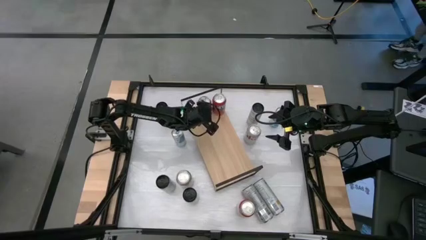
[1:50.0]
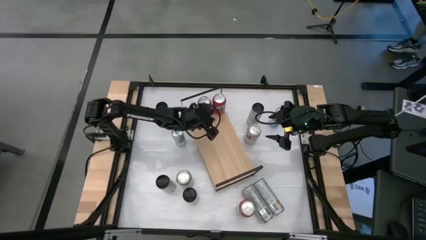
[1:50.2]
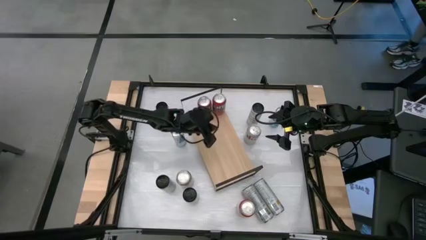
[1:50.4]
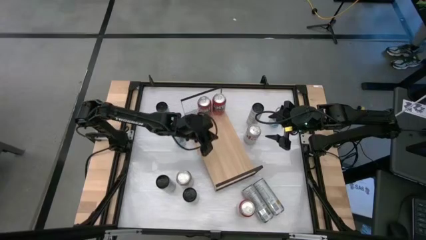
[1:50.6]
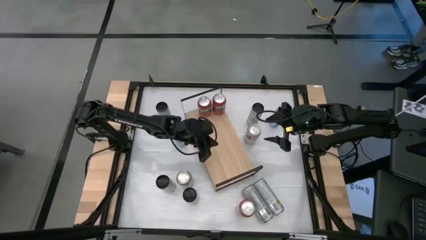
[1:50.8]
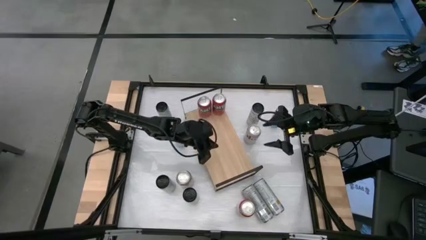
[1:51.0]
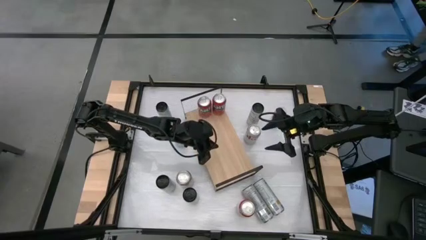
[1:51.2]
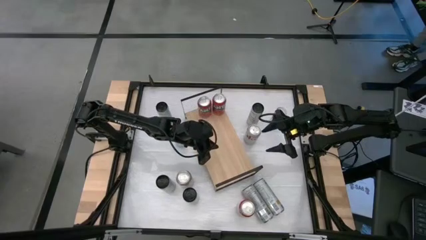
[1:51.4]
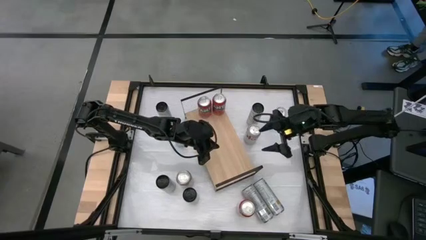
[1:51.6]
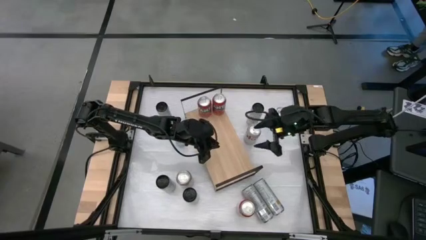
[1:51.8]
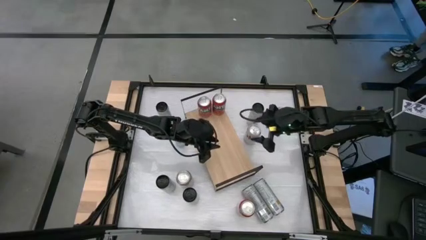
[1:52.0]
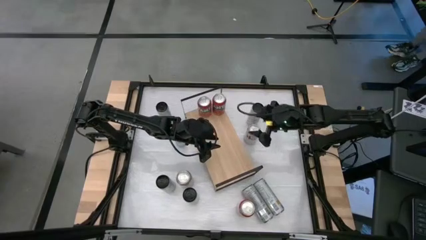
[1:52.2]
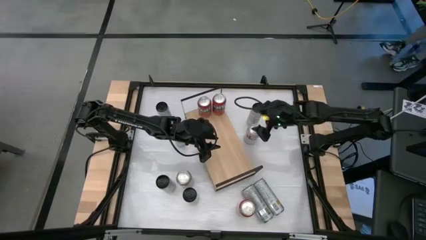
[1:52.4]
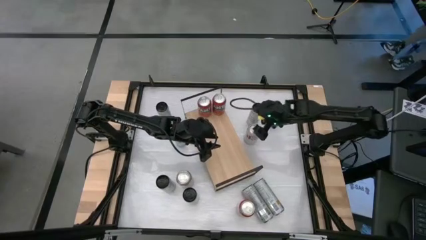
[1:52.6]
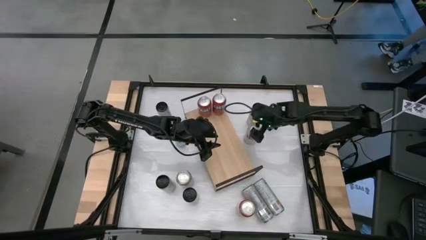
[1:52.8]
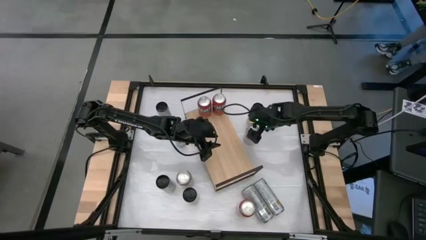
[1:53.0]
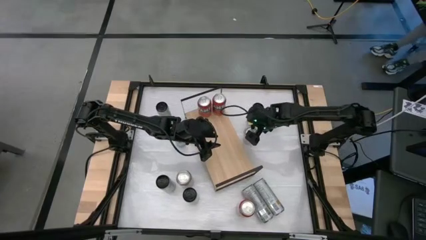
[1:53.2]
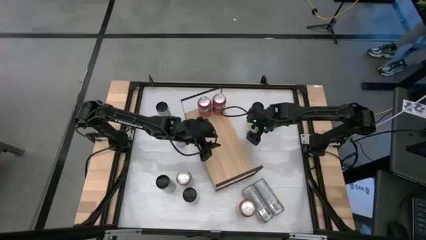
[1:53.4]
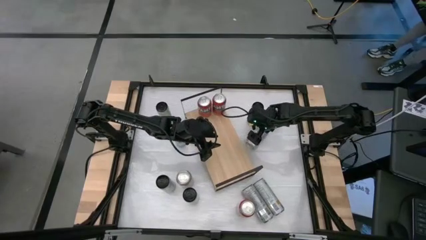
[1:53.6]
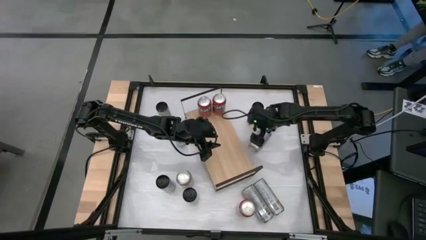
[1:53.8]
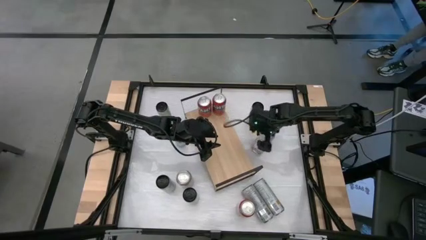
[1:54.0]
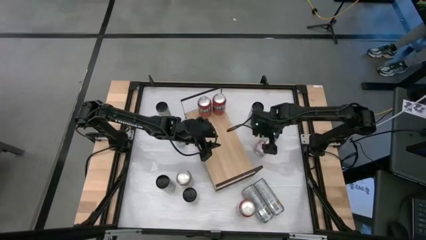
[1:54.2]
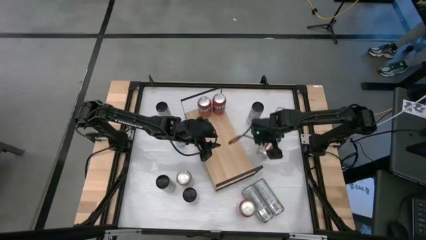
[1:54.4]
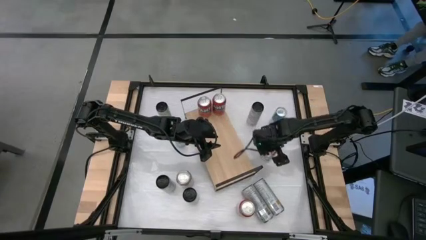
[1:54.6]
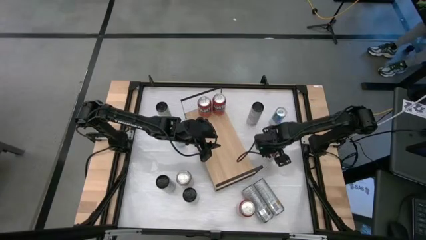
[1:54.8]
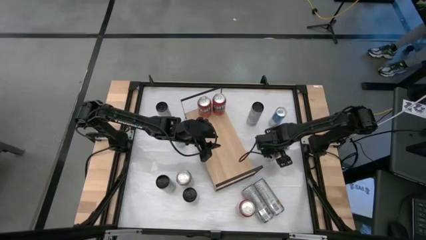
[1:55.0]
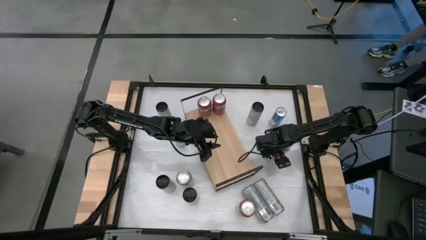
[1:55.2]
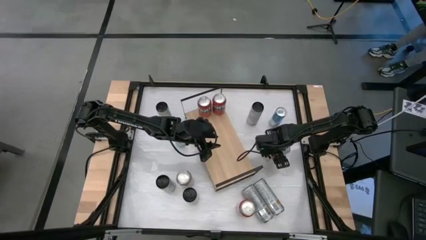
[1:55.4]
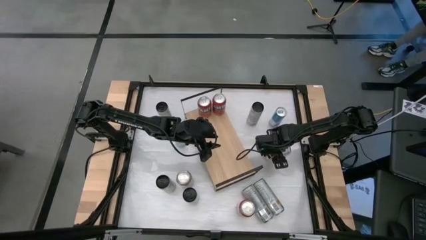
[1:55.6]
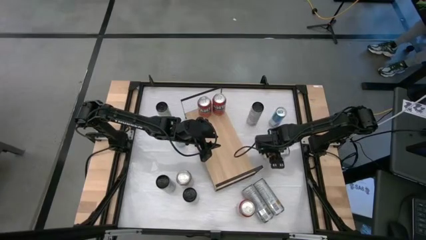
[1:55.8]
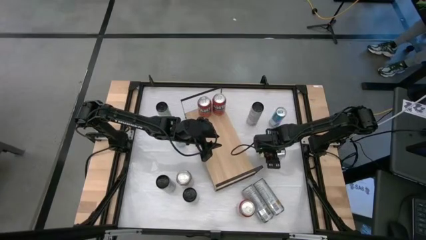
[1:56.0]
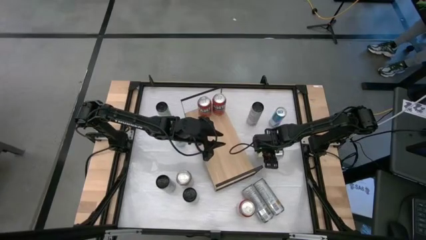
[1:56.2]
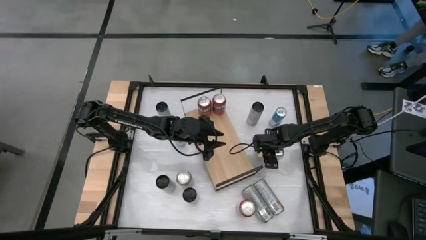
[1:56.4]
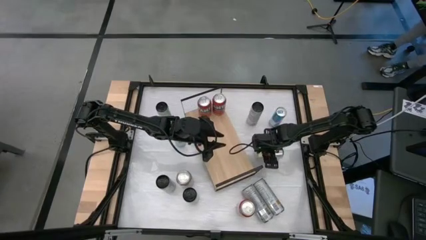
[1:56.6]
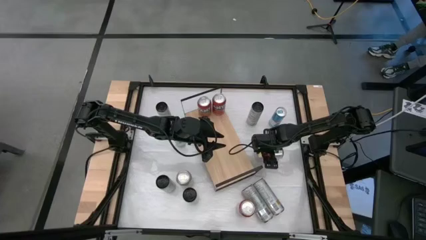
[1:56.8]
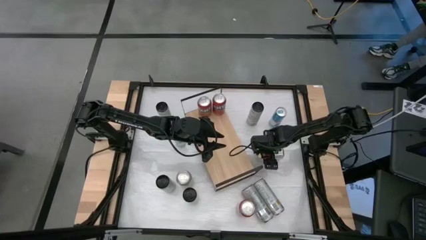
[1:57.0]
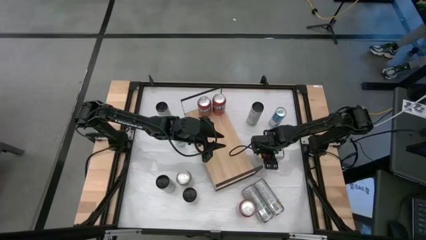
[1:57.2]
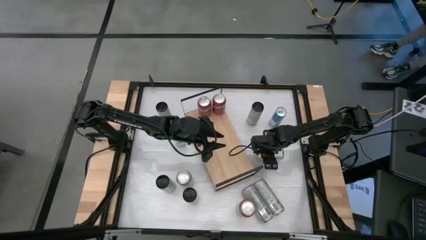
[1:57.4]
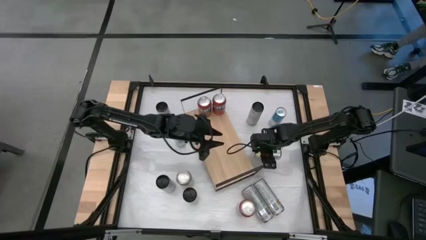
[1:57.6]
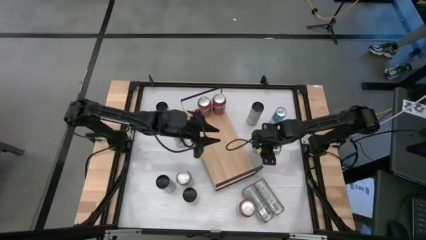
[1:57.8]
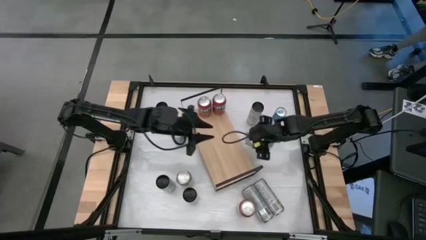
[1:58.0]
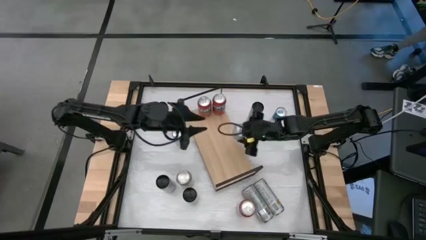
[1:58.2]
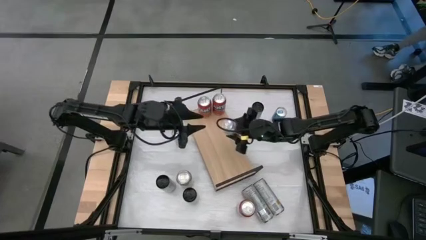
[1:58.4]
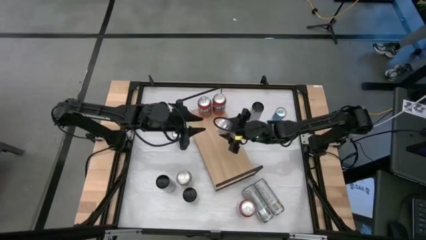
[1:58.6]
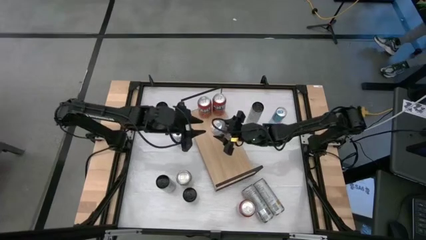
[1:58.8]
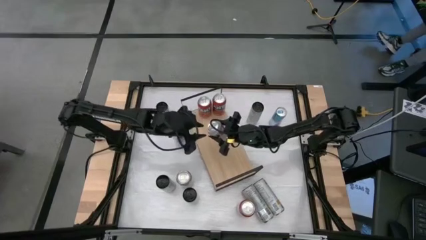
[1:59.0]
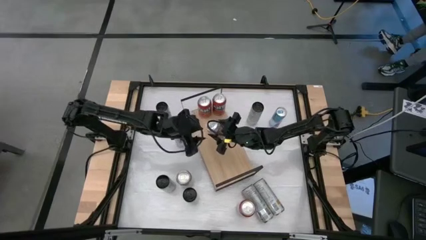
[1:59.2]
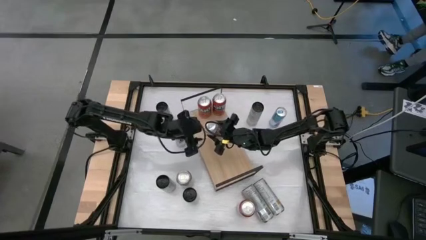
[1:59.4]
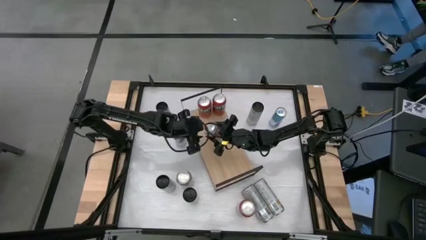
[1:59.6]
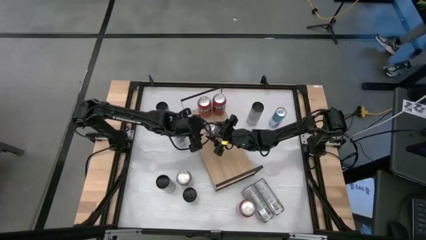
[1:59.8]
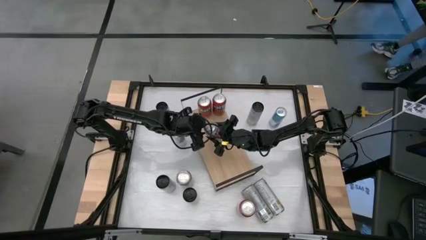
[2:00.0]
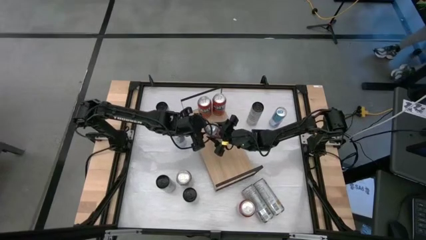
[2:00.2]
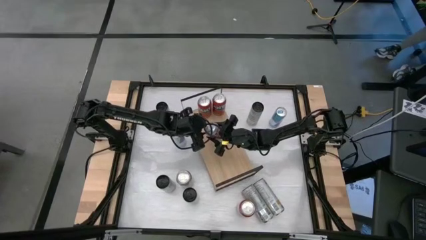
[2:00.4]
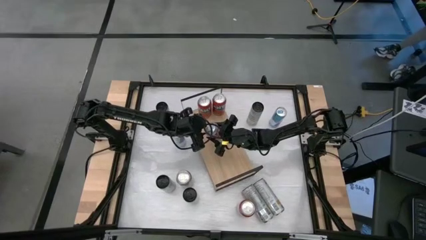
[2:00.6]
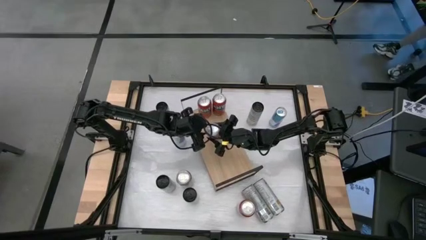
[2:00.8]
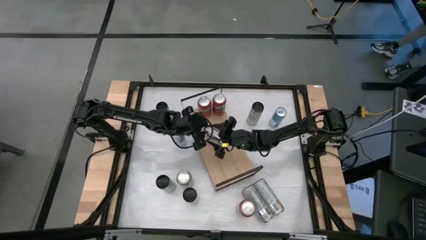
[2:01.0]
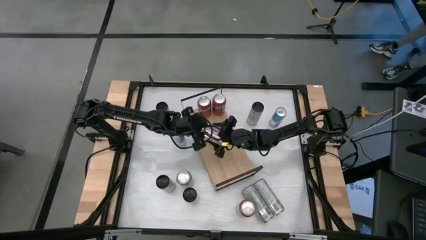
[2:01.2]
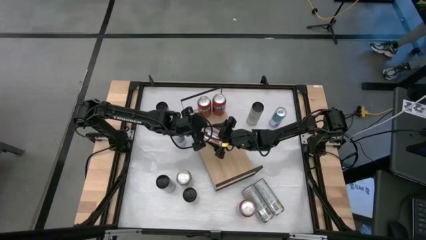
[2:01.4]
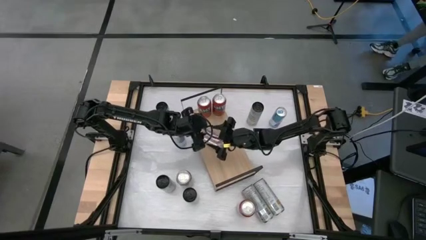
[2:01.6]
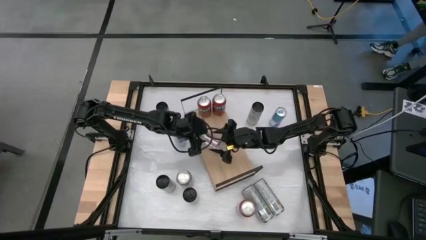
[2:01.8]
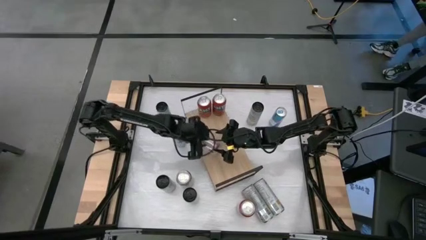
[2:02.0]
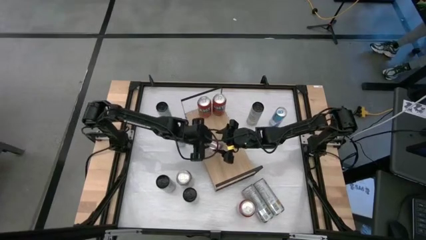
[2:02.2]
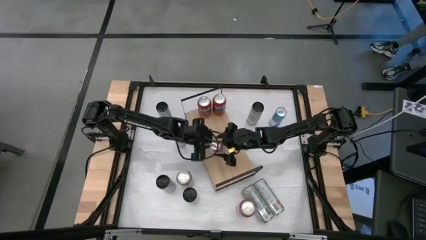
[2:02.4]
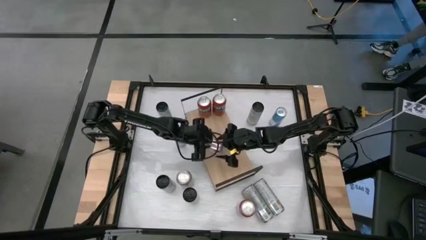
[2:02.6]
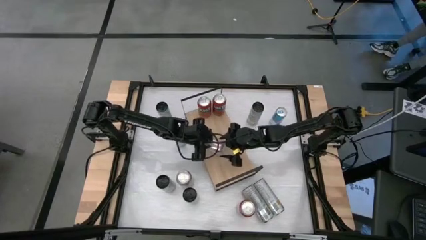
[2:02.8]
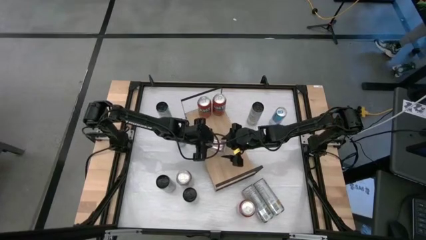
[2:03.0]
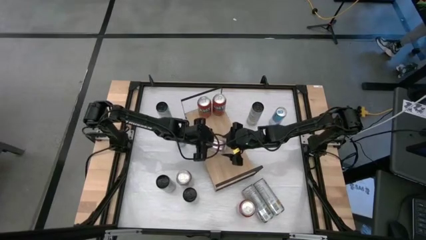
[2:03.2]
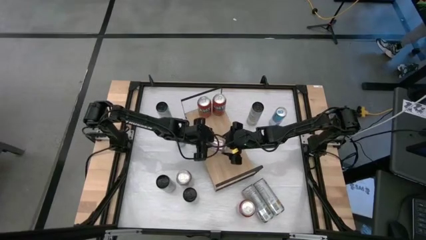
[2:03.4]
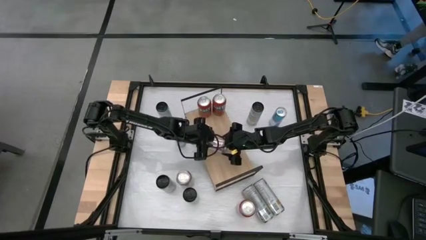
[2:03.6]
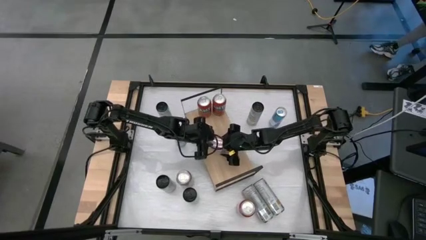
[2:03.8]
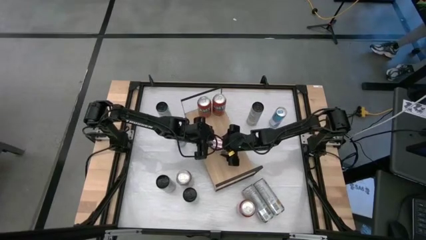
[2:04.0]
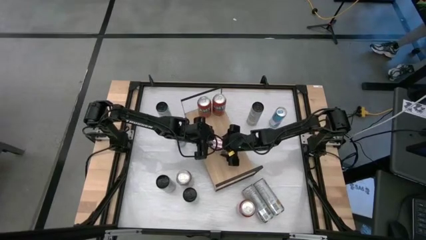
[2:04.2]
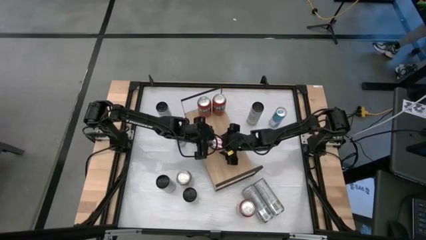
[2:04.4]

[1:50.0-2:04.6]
Task: Place canned beverage on shelf
Put the top right white soda can on the shelf

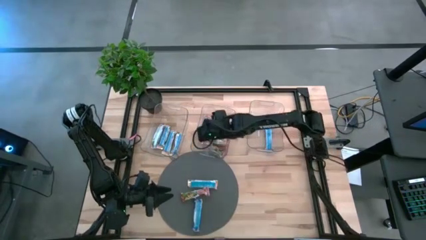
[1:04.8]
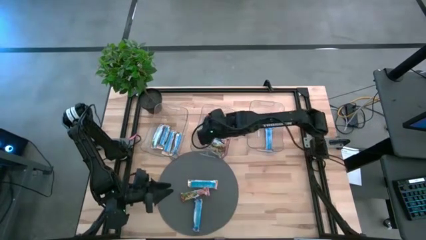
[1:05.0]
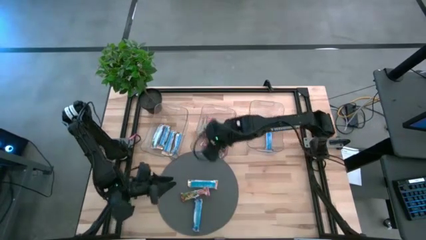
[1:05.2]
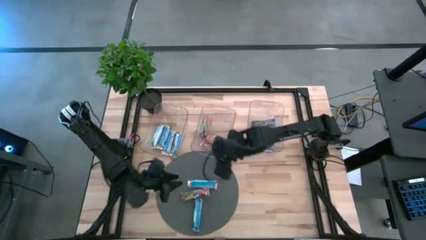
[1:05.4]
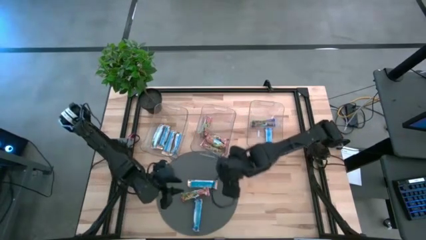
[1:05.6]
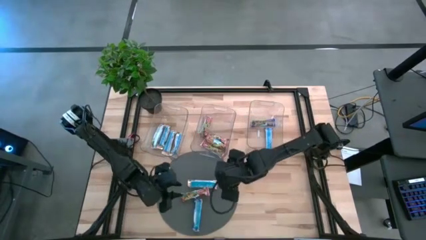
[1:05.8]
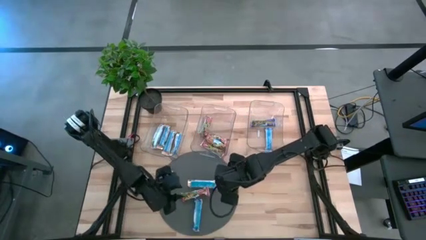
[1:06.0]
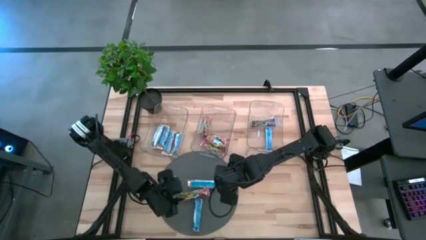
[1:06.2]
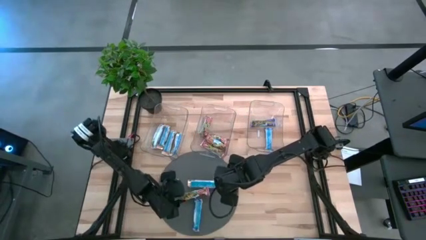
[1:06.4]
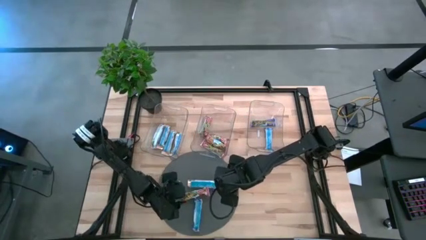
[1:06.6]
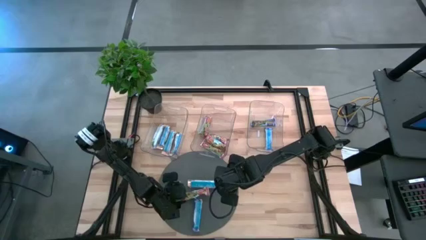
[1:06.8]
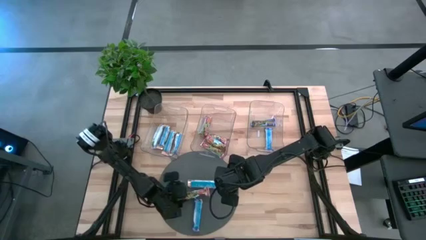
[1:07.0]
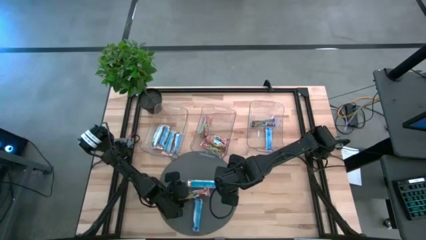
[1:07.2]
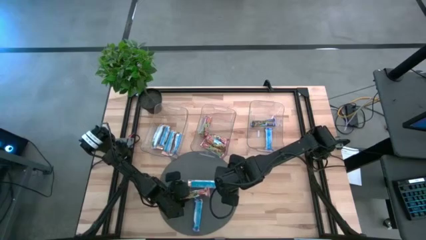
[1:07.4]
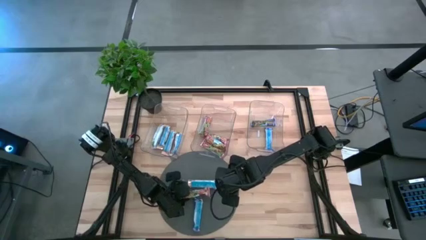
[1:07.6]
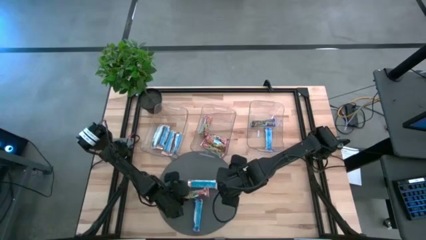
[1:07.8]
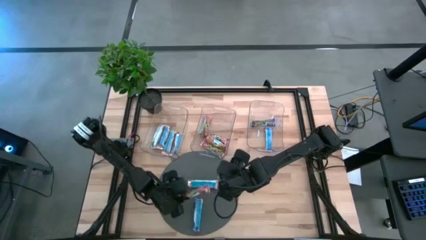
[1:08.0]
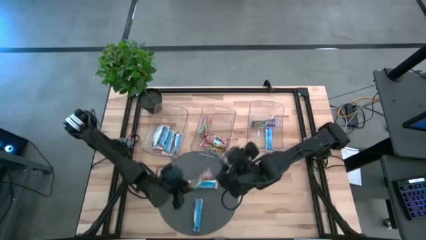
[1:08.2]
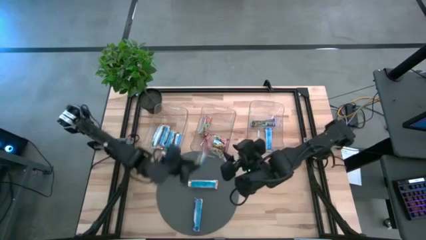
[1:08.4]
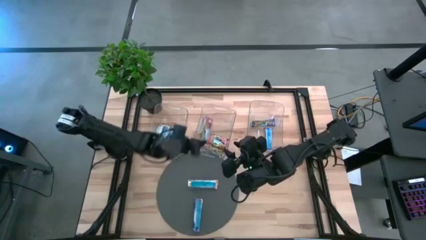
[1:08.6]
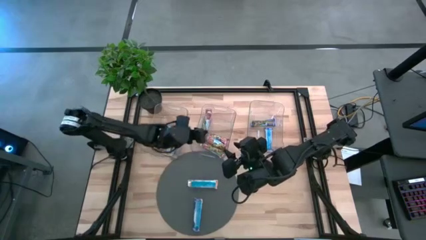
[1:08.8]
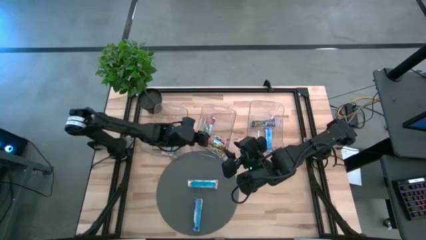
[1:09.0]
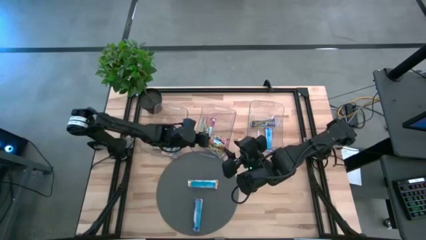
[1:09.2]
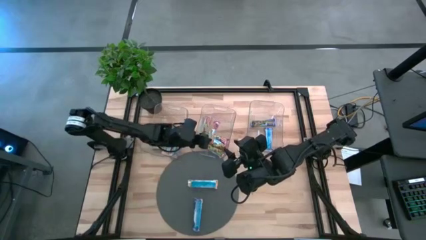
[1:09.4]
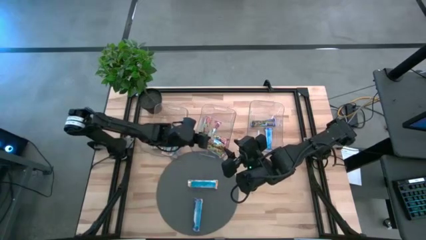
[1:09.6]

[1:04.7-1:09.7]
Task: Pick and place Granola Bars by type
Put the red granola bar into the middle transparent bin
